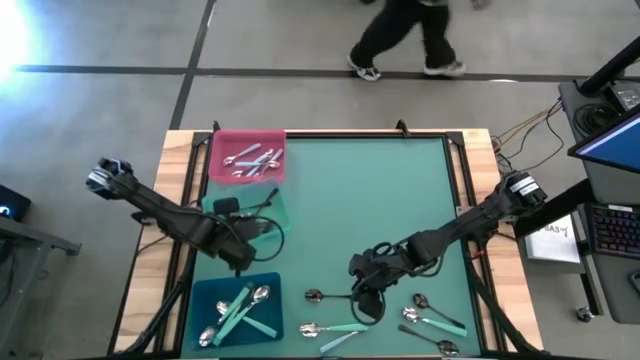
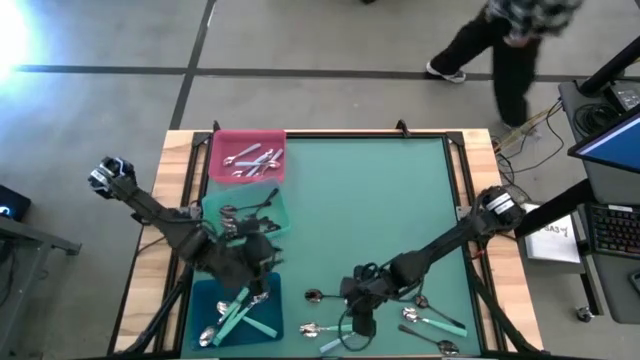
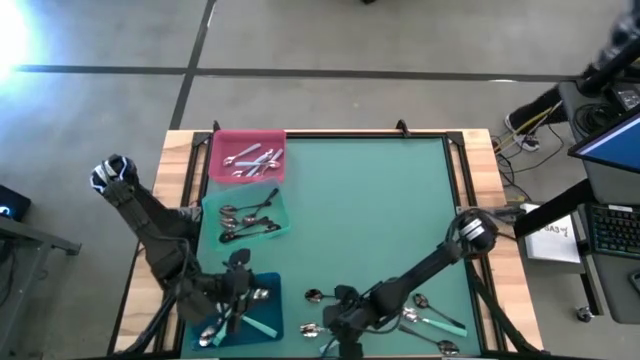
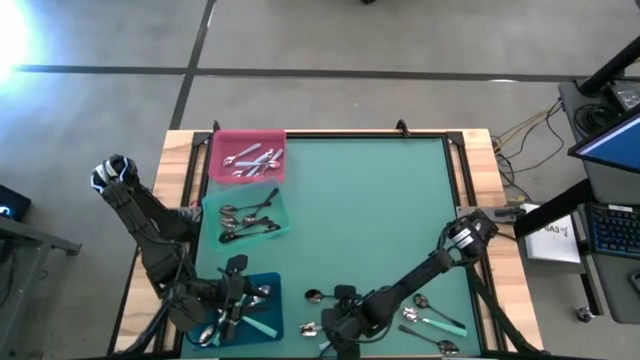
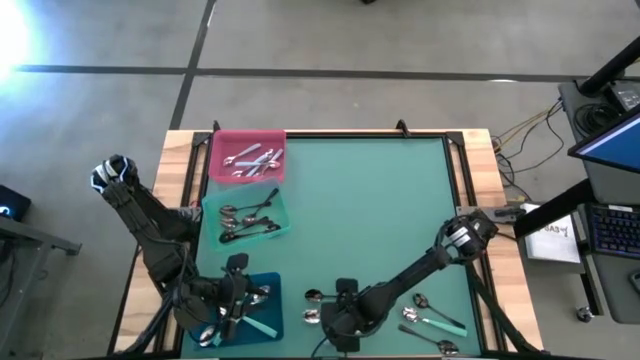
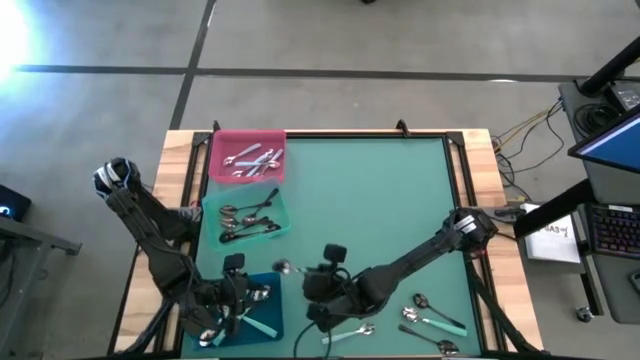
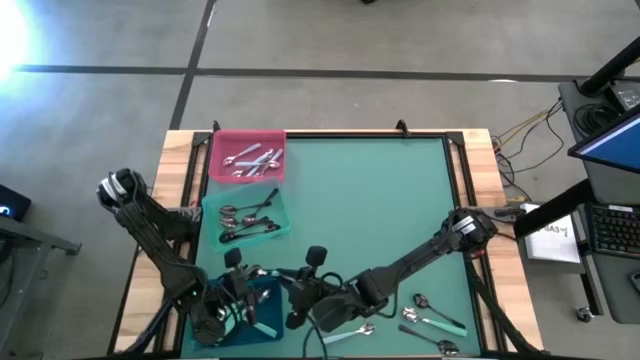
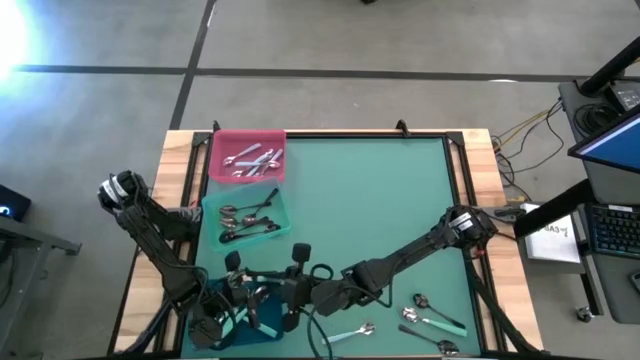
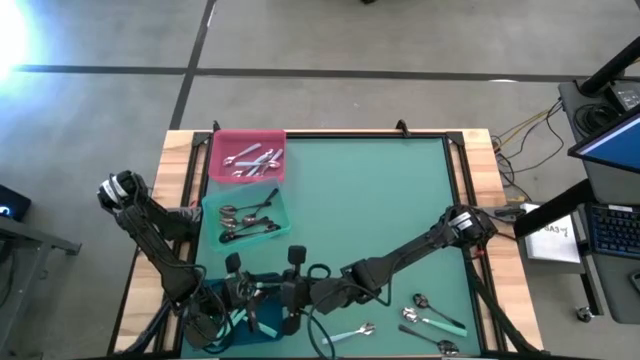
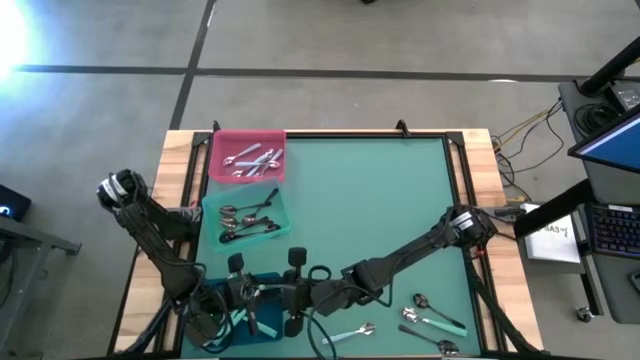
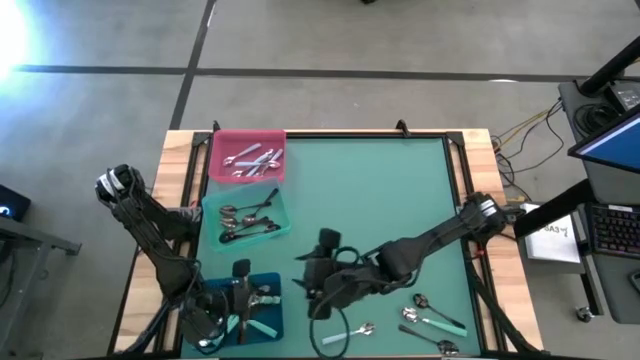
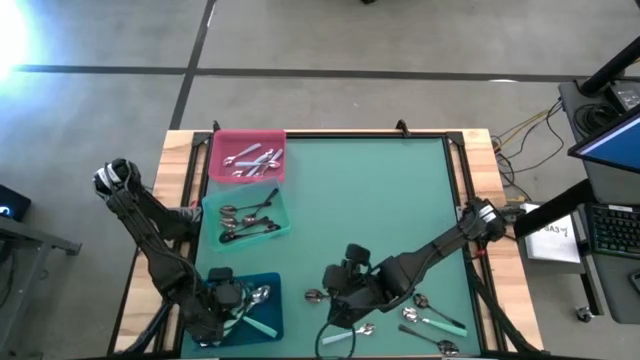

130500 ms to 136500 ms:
Task: Sort silverware by color (type)
Put the light blue into the blue bin

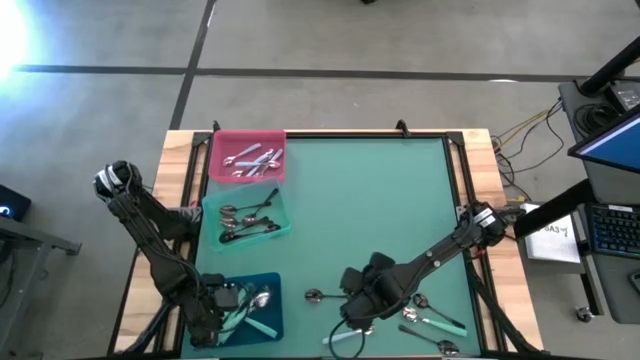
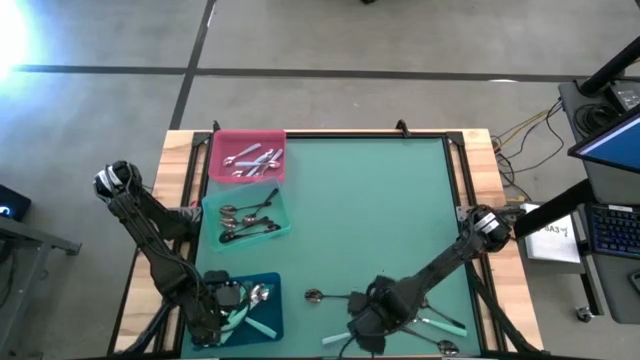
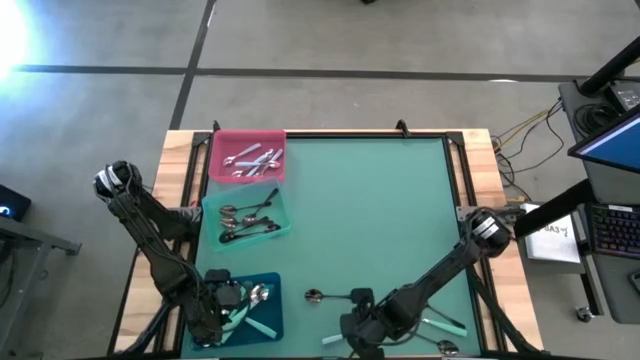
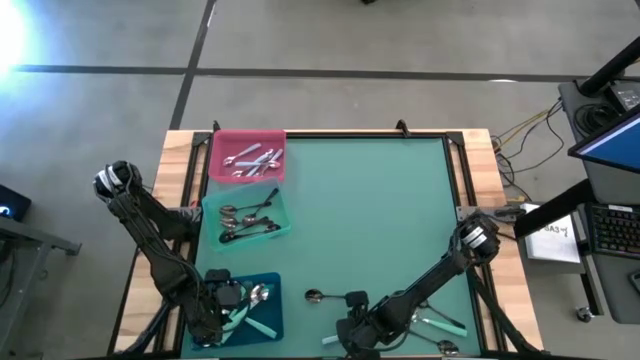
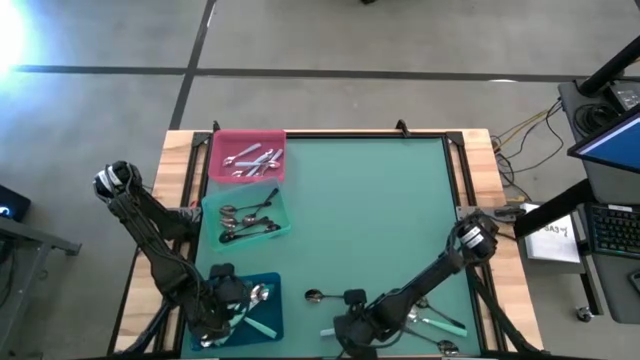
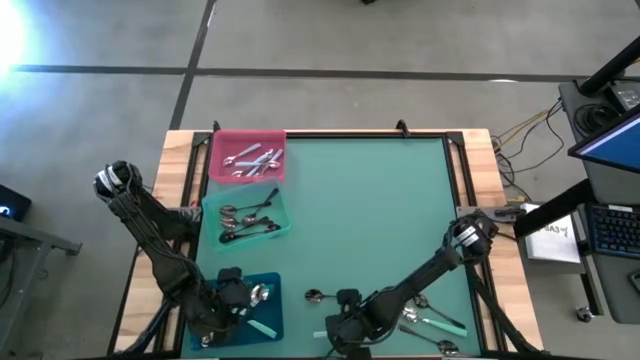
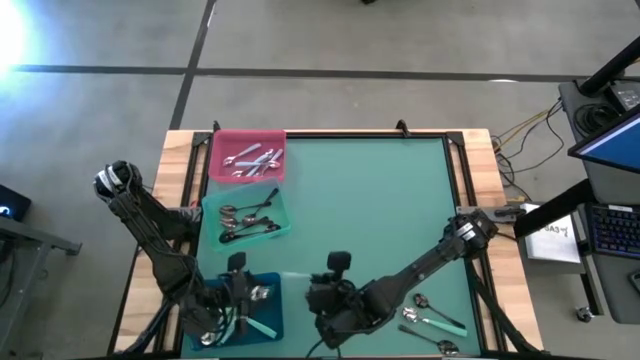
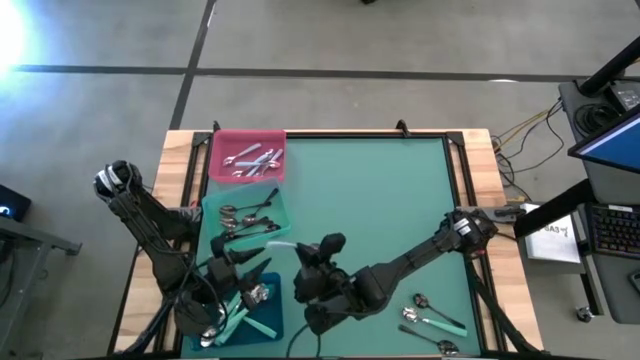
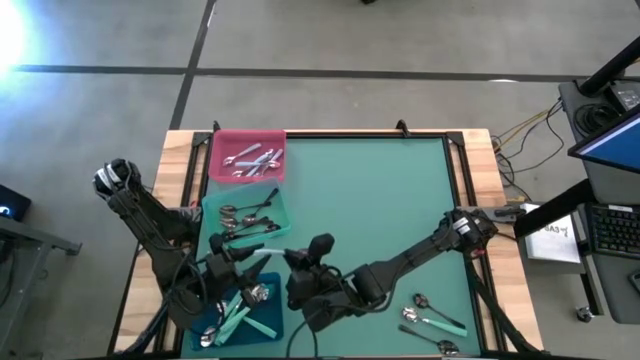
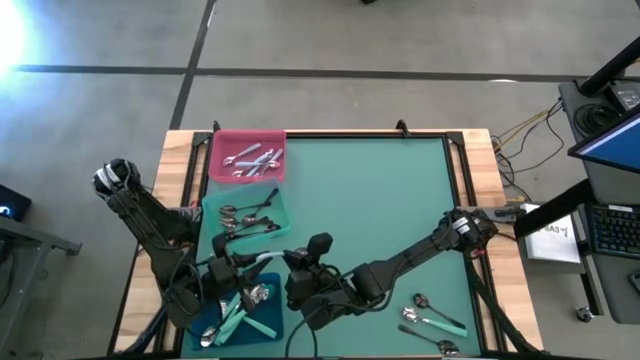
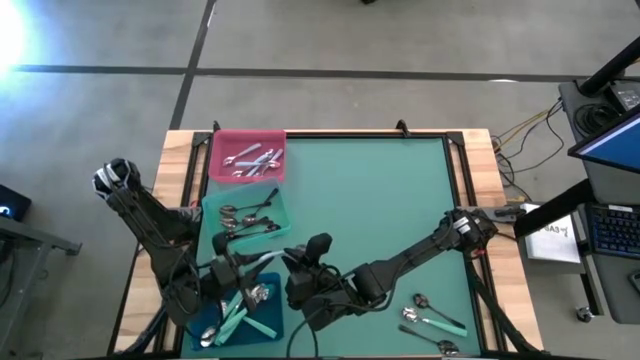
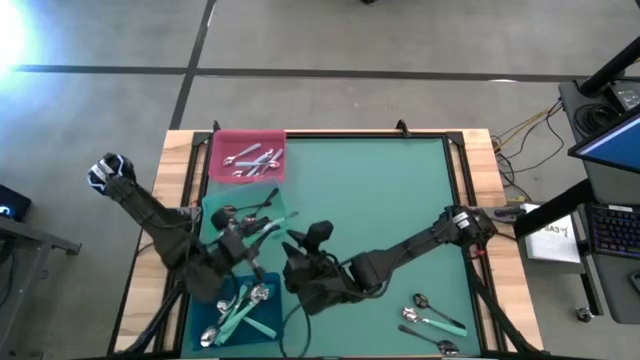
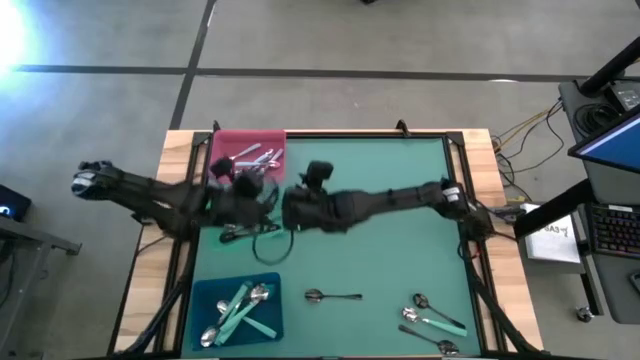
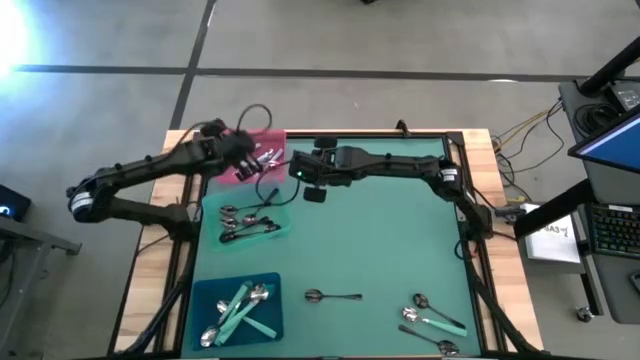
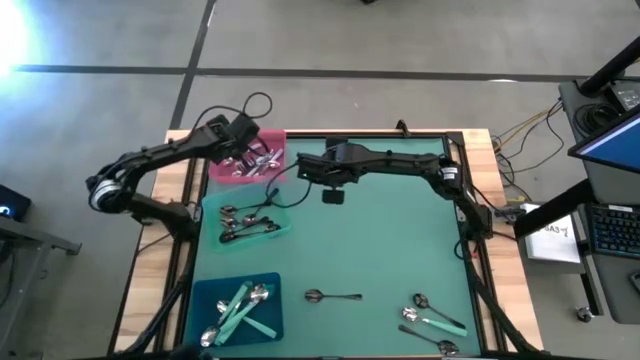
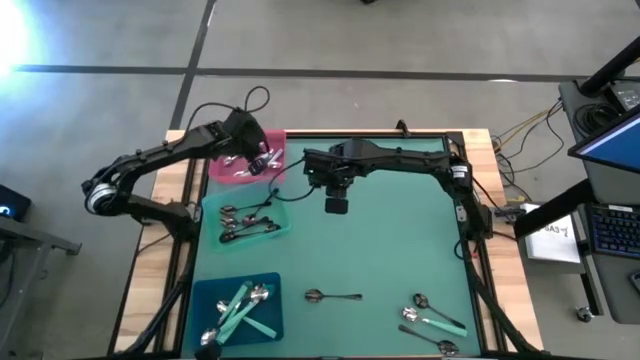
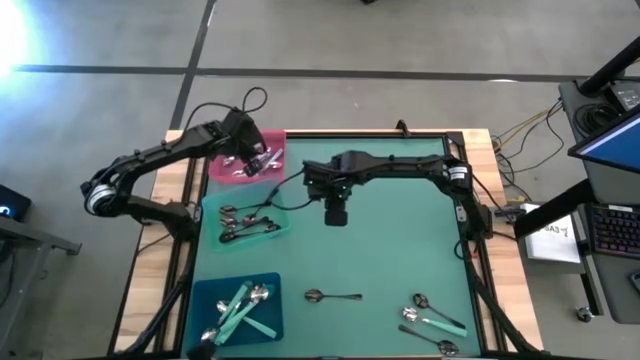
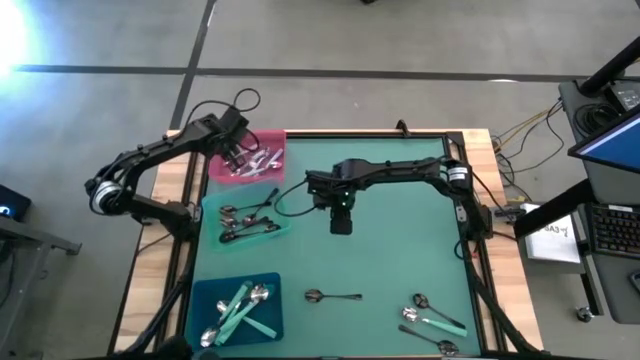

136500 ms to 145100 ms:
Put the blue spoon into the pink bin

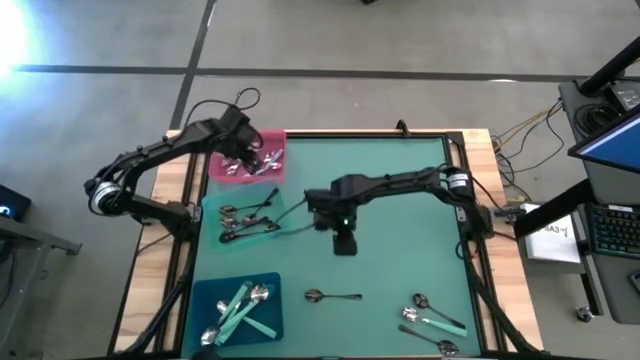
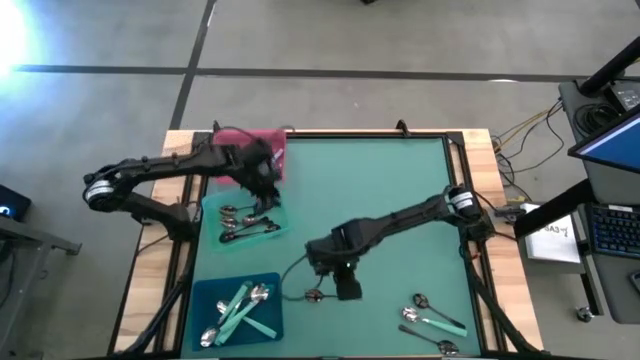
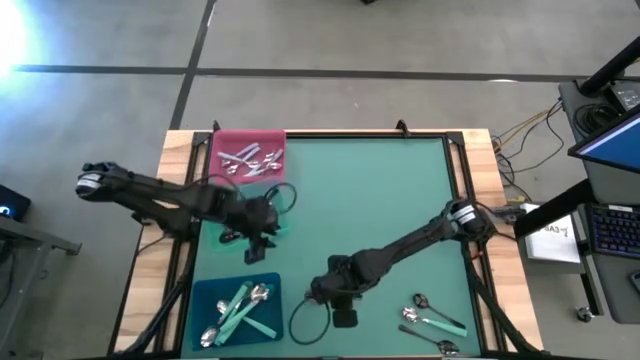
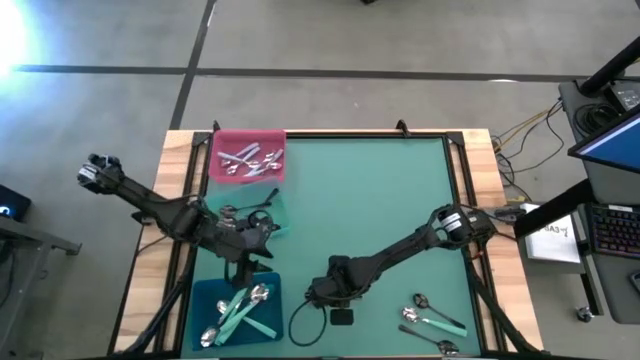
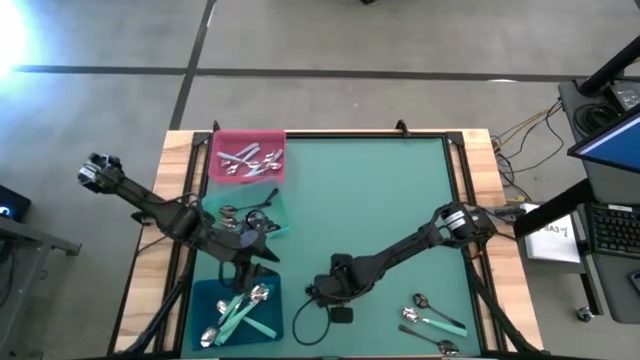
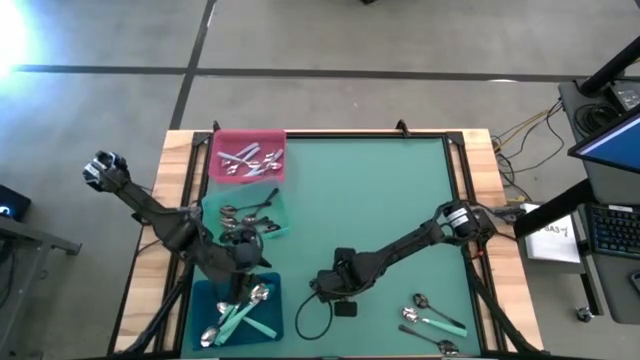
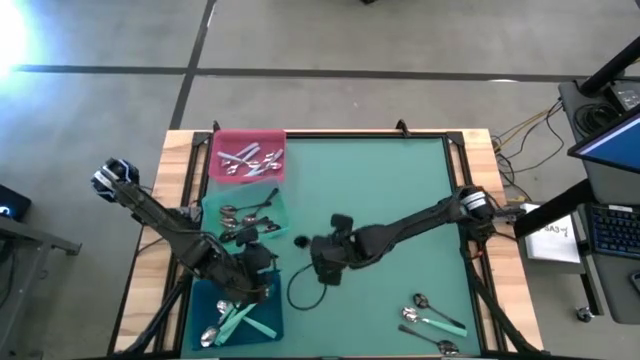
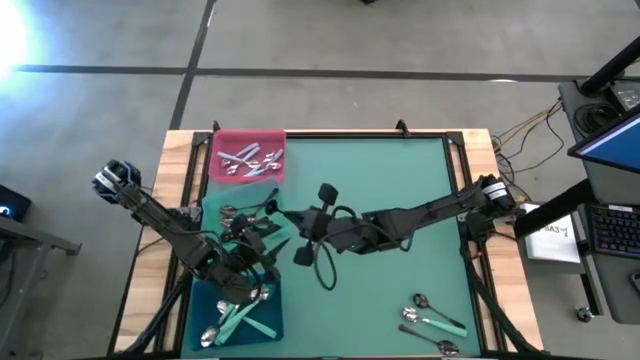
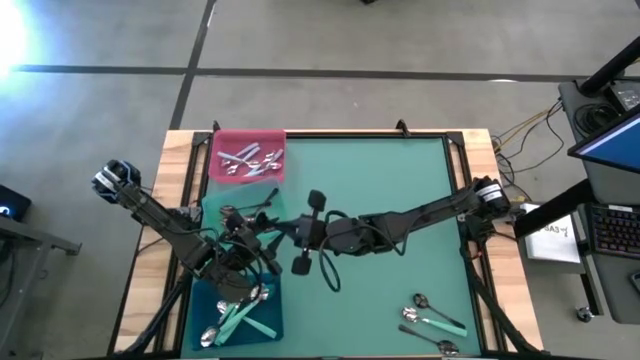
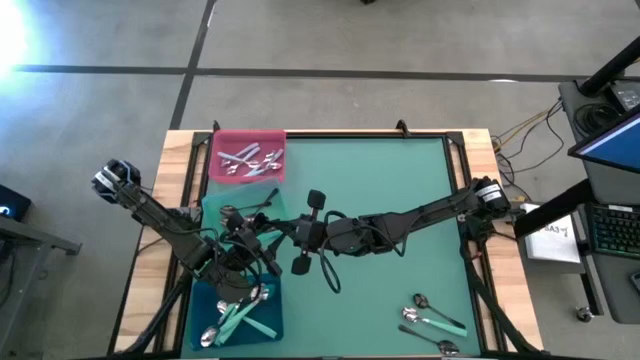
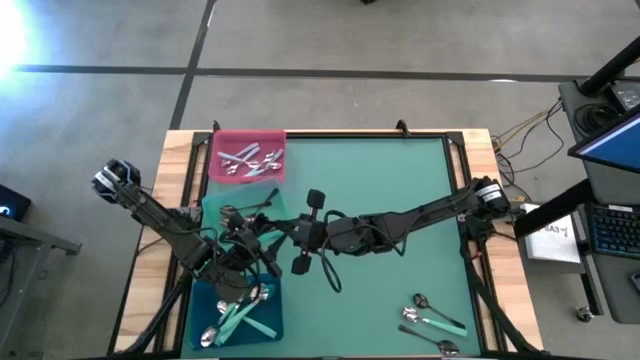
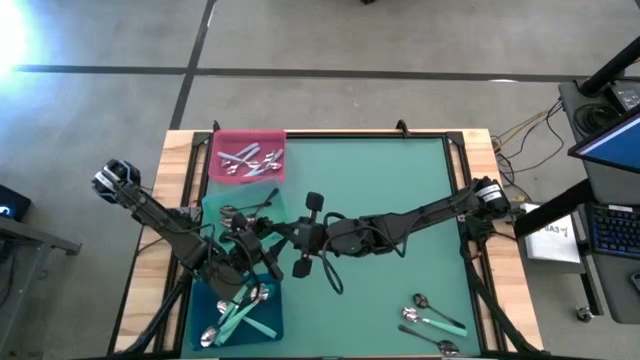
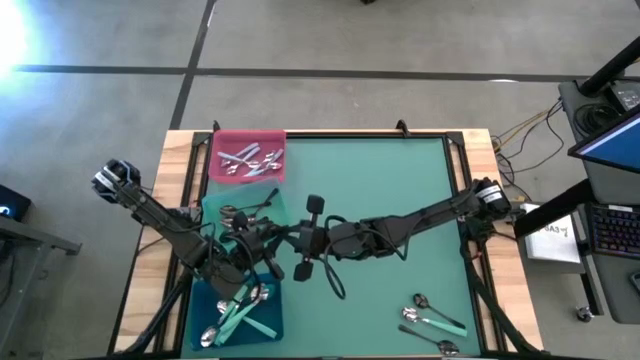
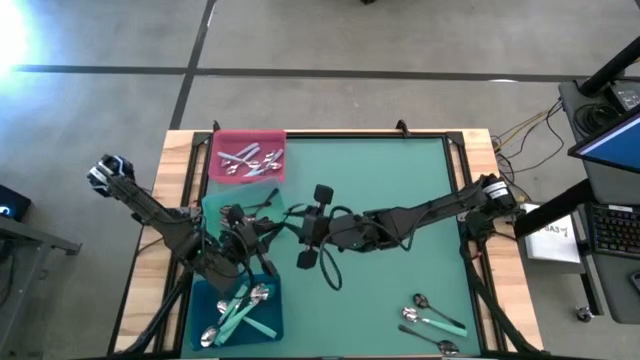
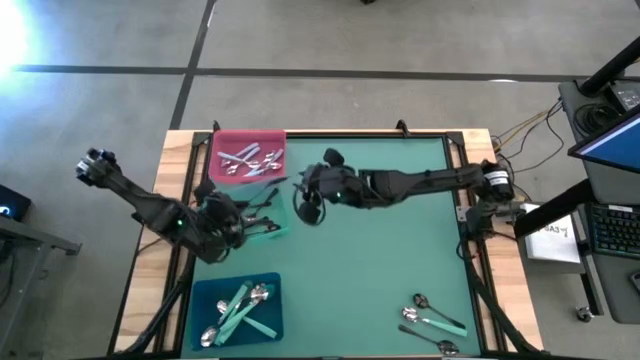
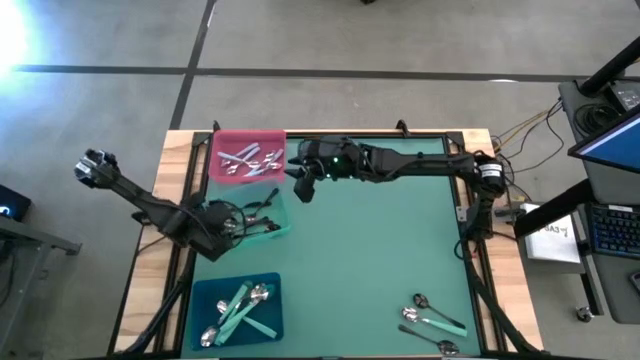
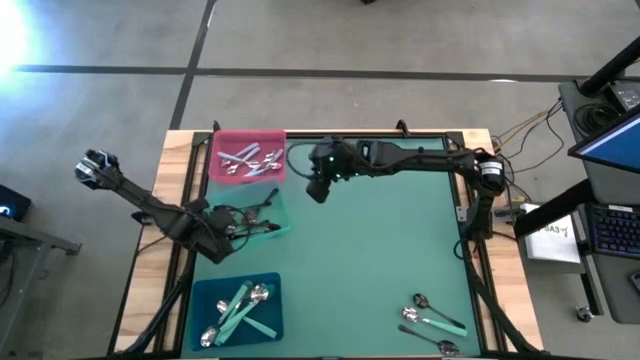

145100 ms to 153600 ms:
Put the black spoon into the green bin
